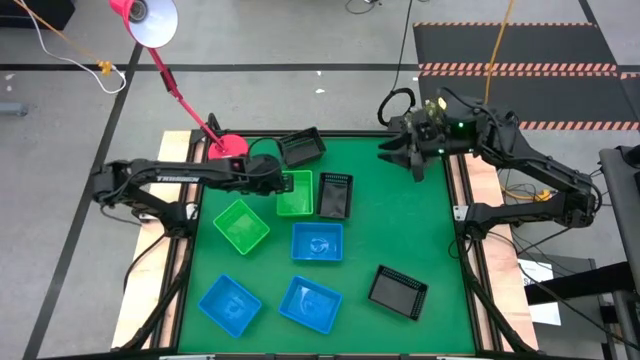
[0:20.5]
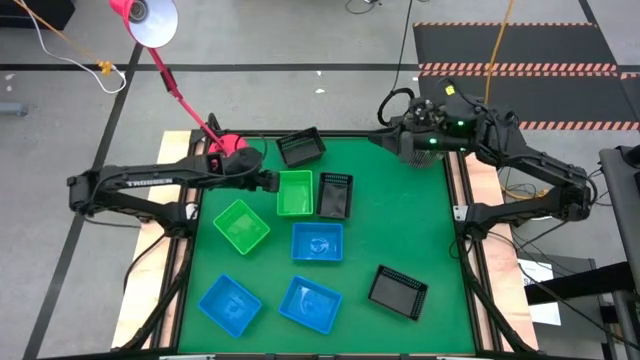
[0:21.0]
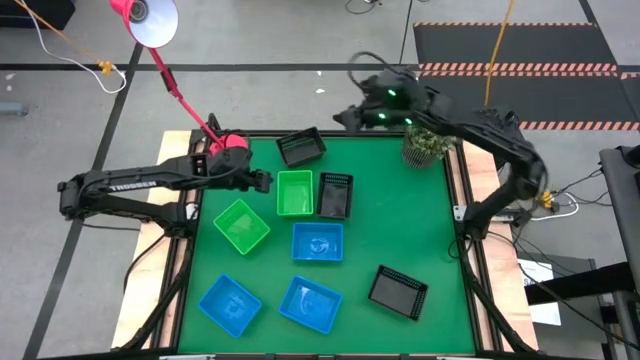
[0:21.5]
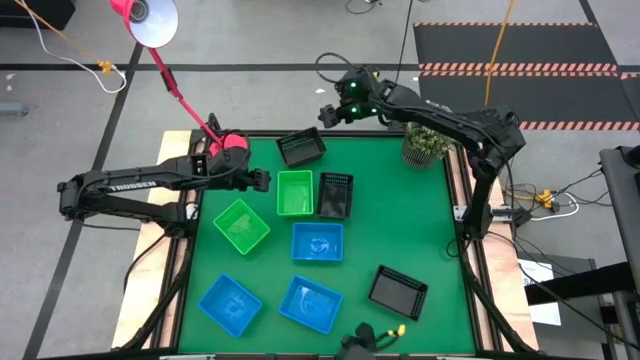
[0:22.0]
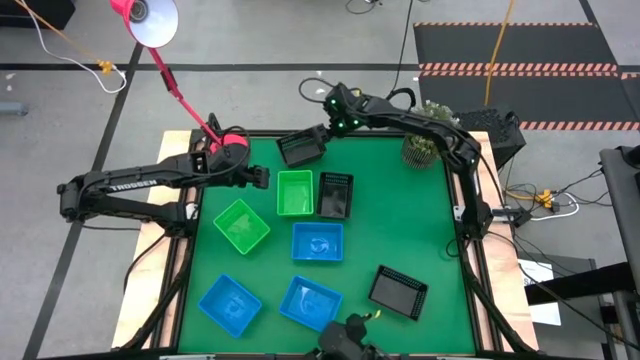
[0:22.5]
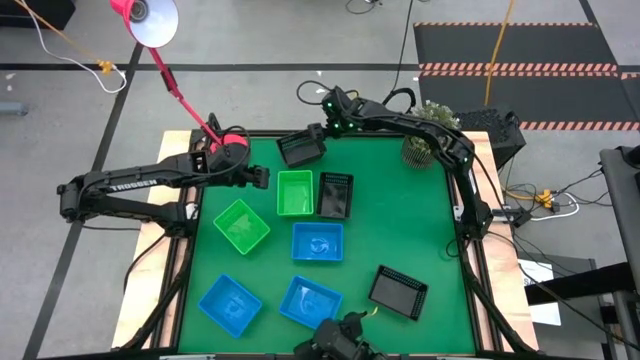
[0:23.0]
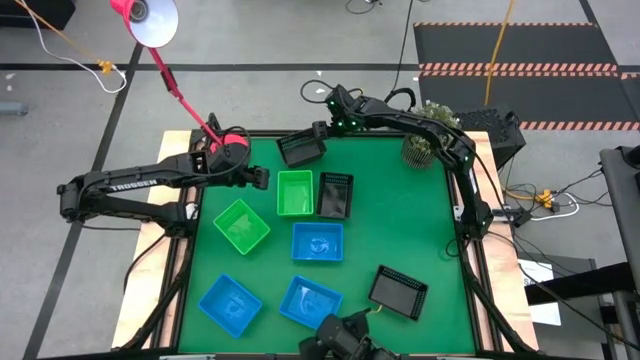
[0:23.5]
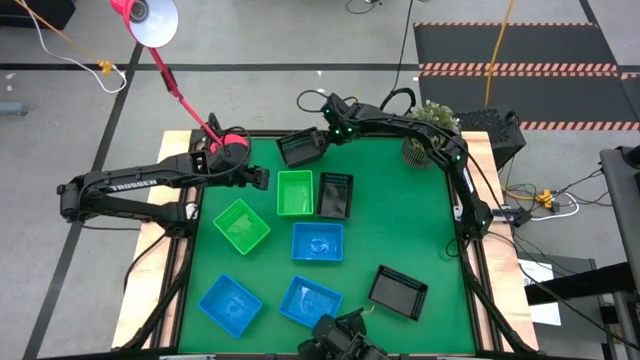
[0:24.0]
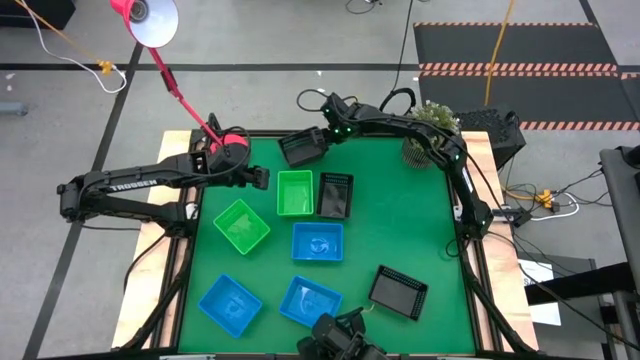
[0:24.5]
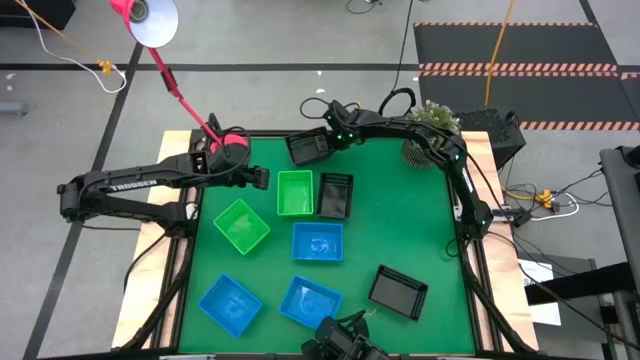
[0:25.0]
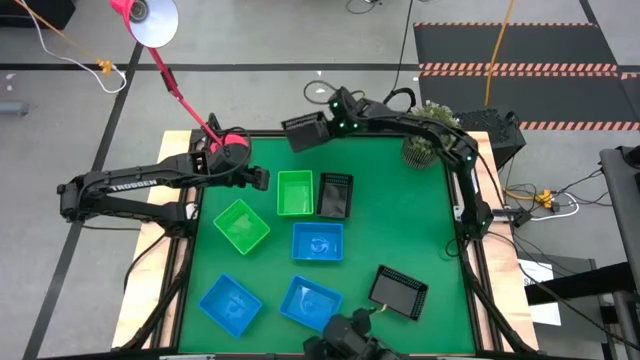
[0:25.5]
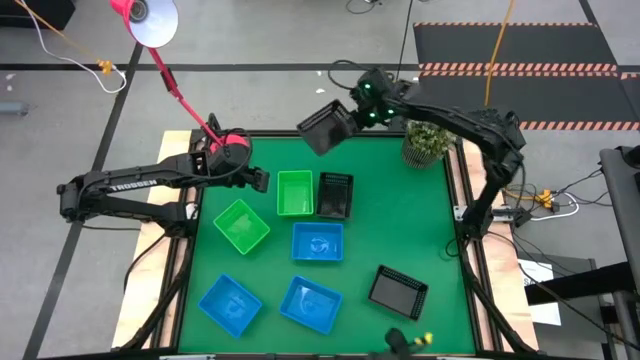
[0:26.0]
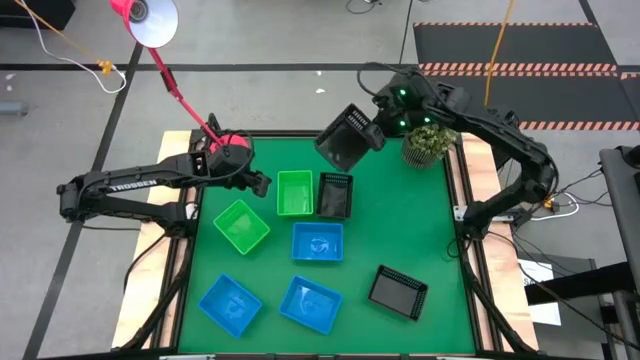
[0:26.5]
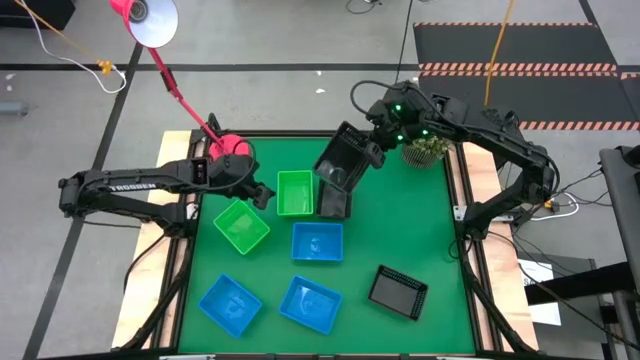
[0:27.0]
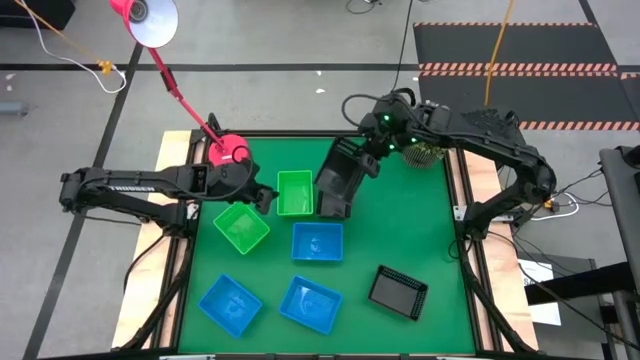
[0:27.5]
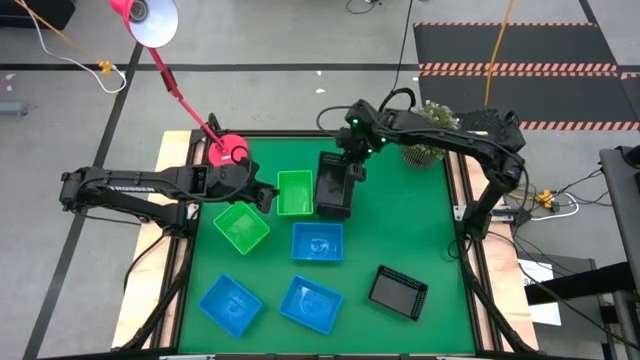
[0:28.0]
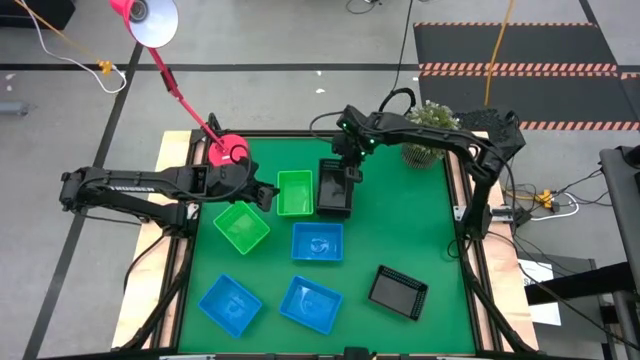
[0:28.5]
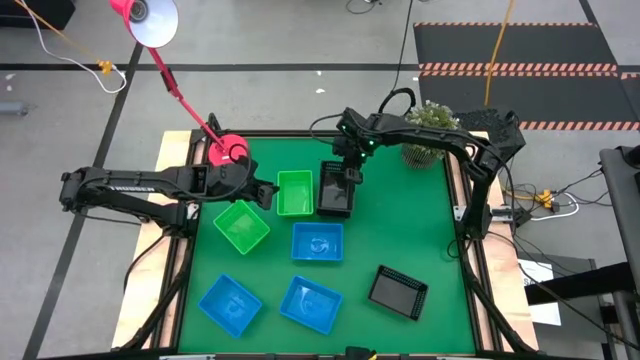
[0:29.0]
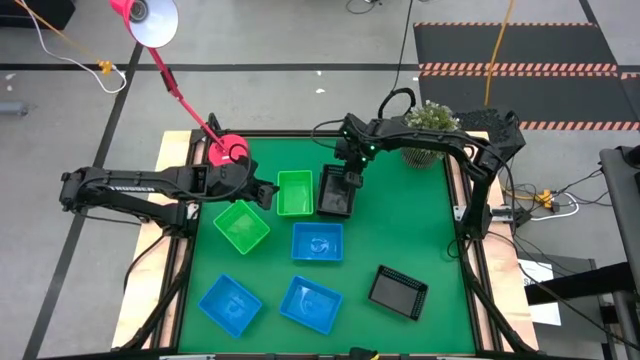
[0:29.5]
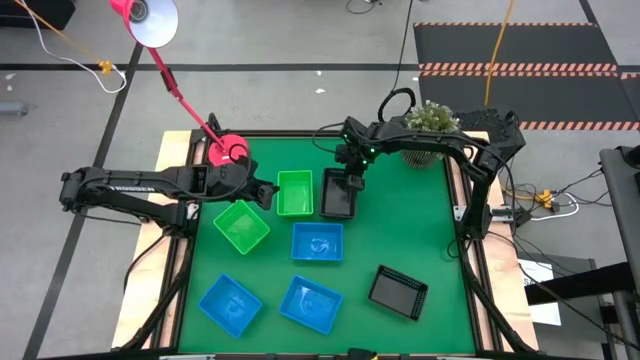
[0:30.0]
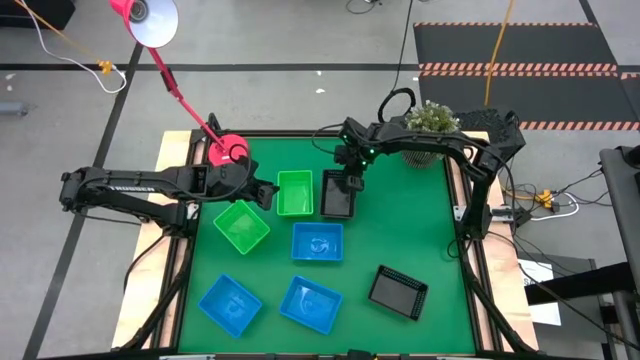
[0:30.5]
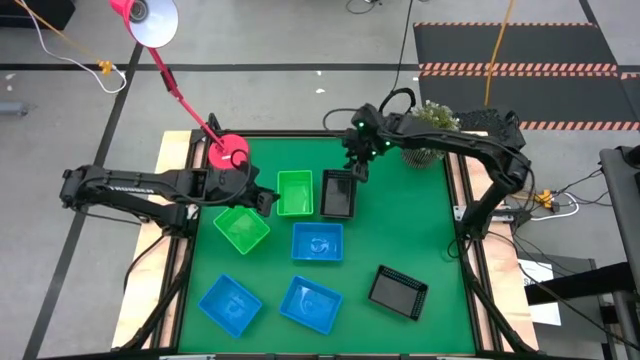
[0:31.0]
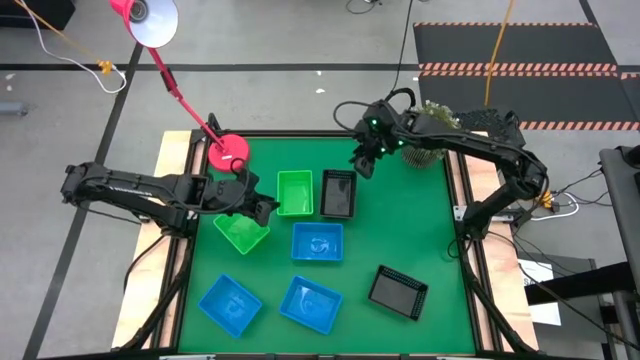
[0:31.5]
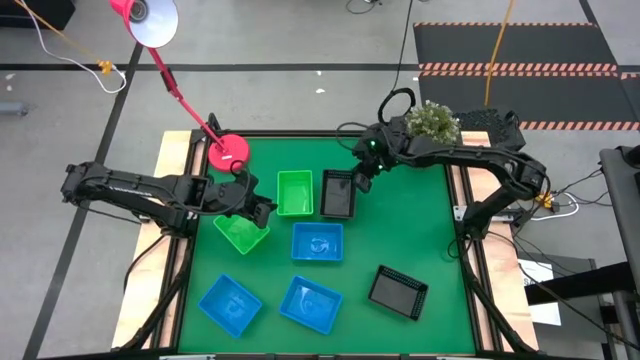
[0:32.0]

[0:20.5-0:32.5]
Stack the top black bin on top of the middle black bin

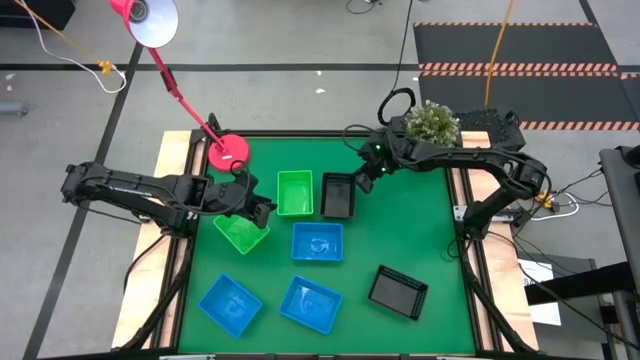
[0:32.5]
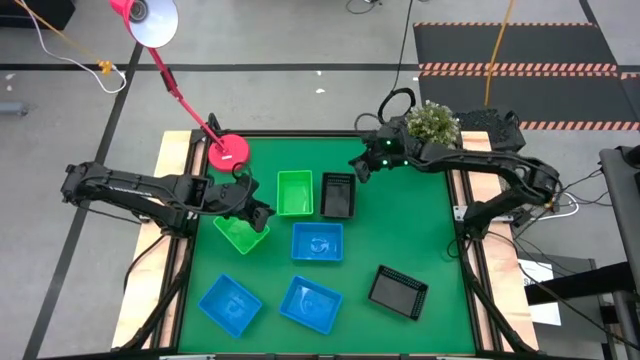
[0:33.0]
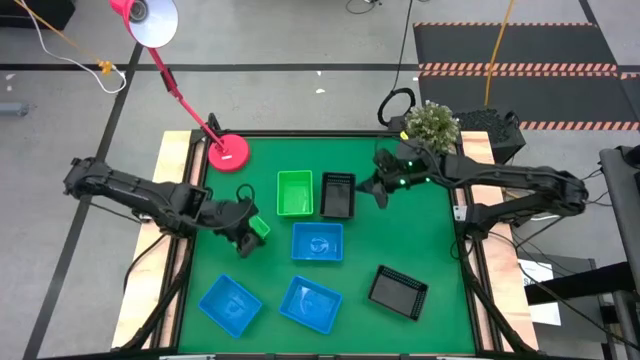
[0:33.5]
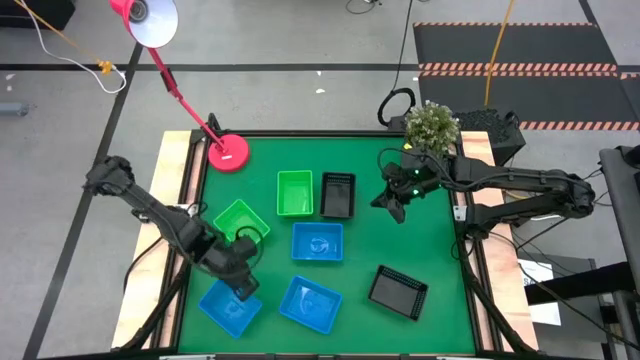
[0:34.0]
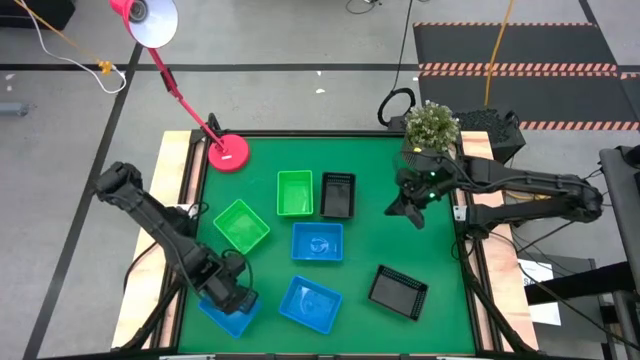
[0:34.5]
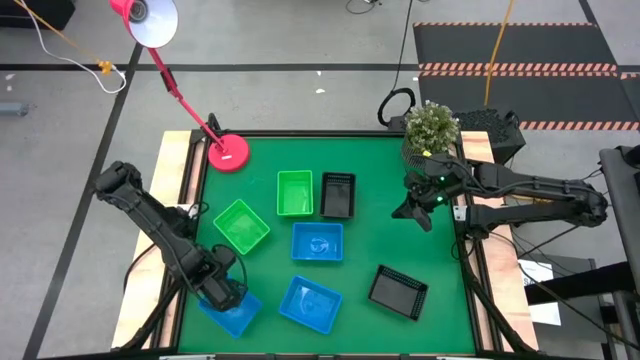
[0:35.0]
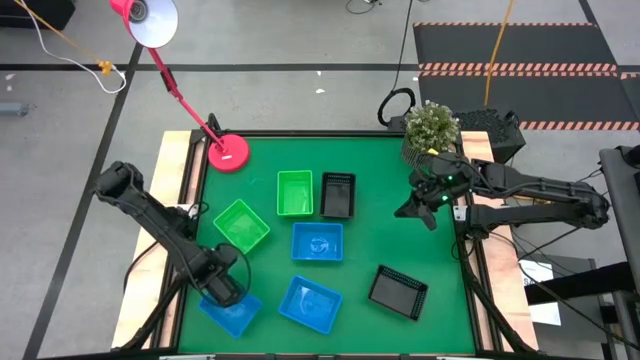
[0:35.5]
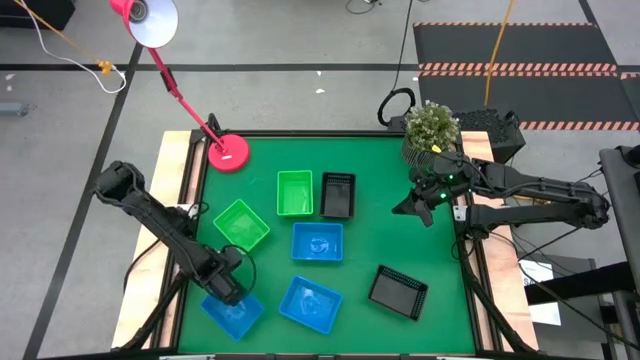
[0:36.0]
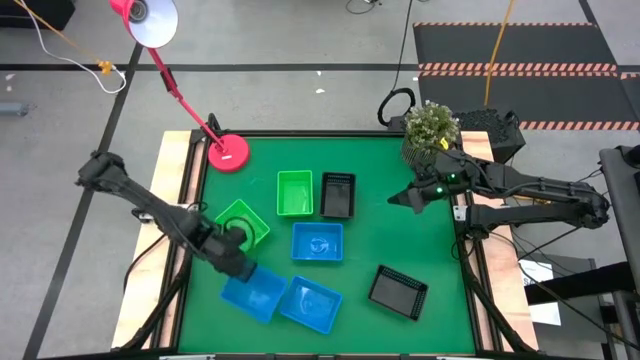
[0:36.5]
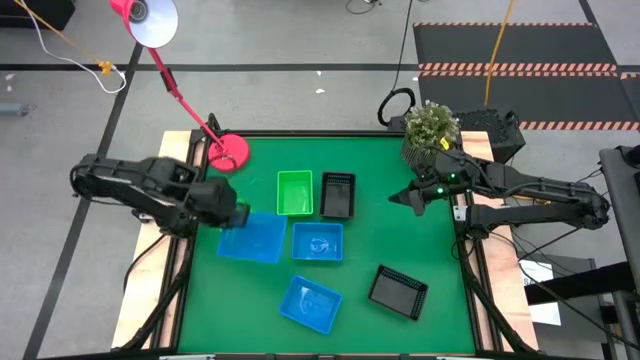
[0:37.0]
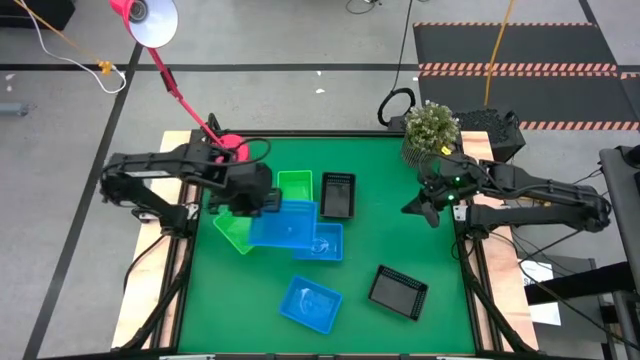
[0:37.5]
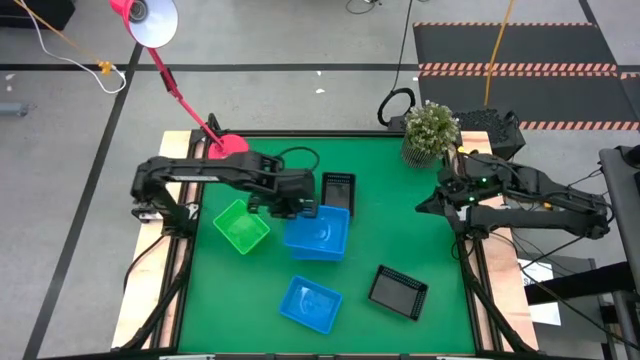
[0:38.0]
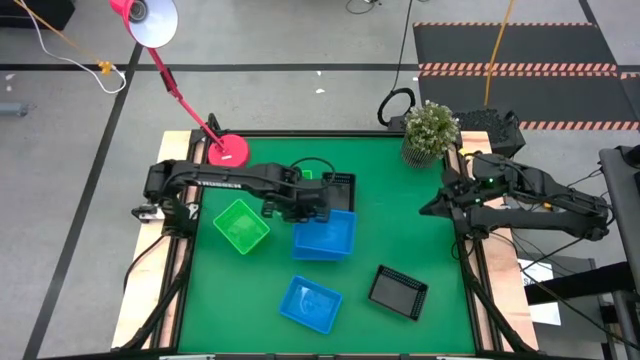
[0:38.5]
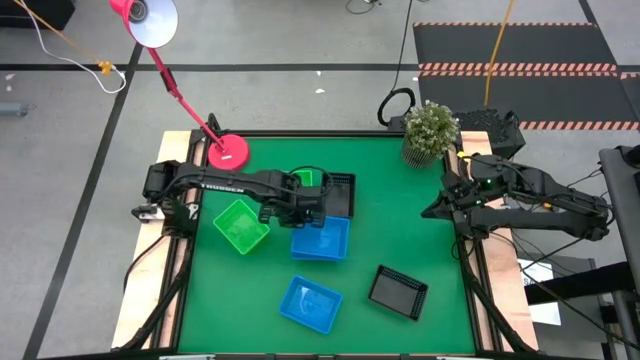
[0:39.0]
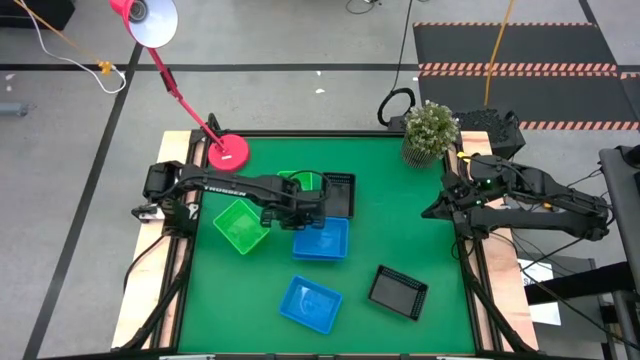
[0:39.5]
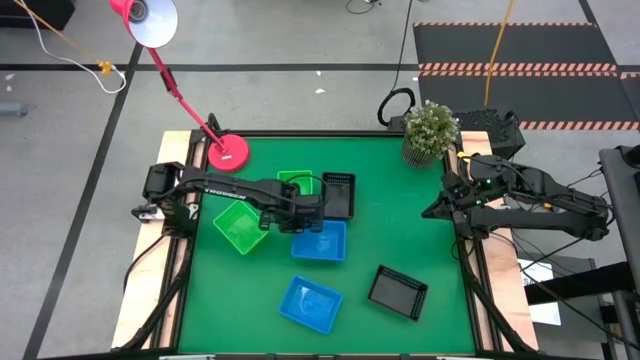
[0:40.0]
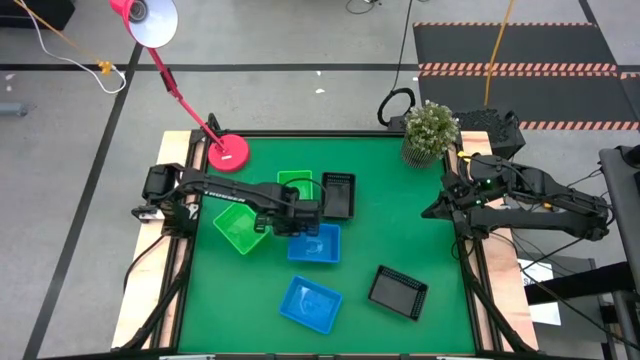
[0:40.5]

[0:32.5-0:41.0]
Stack the bottom left blue bin on top of the top blue bin

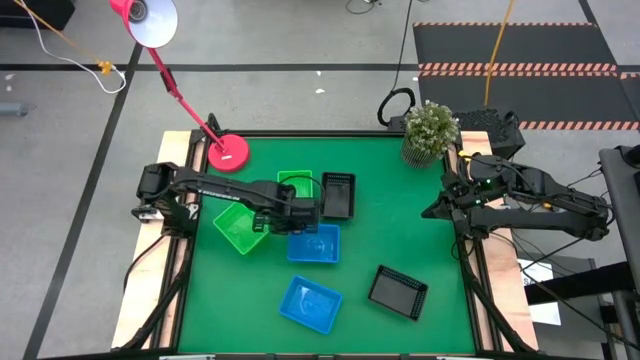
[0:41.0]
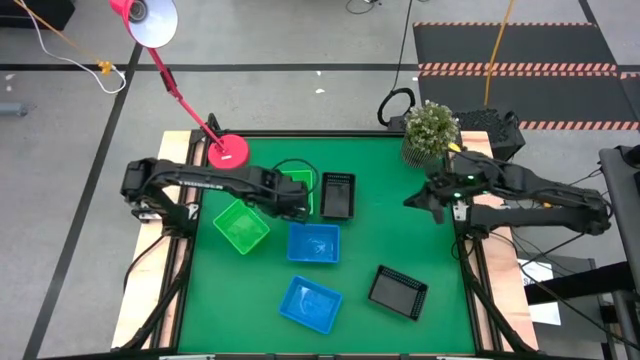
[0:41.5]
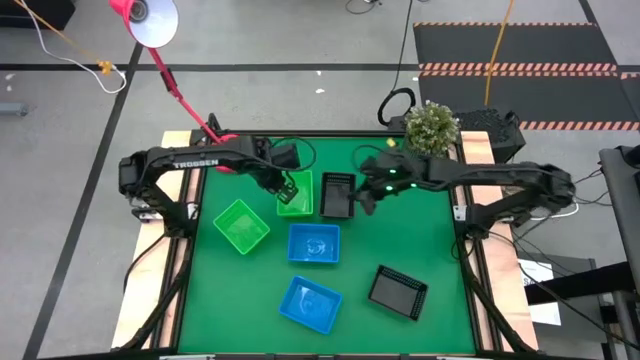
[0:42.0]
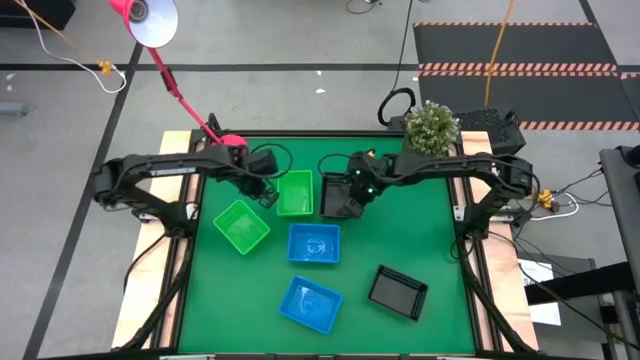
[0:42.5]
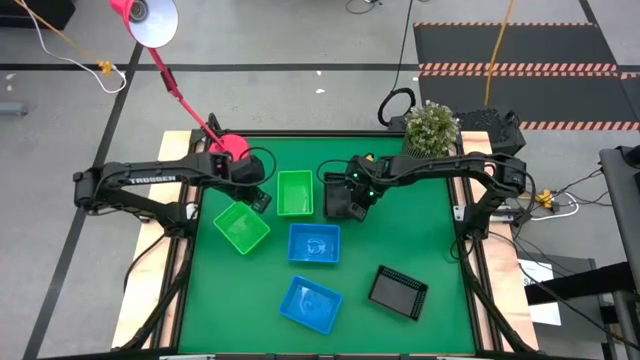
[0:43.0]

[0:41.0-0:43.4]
Adjust the stacked black bins
